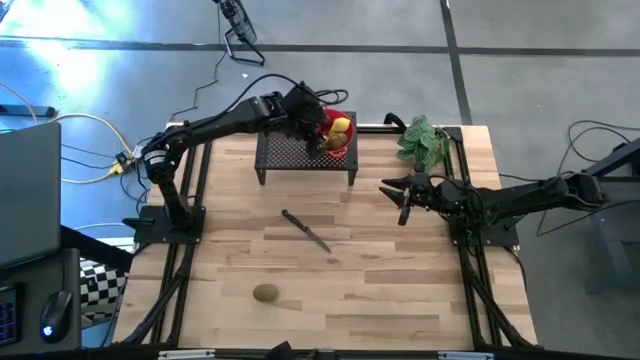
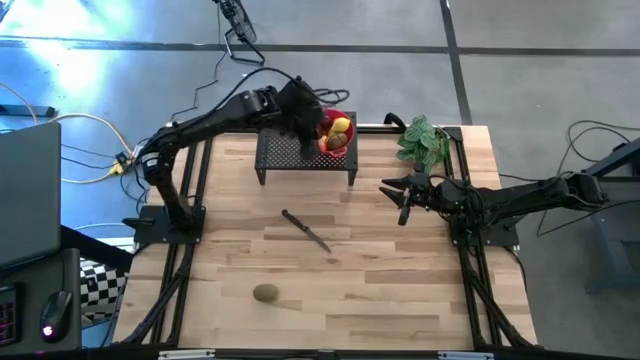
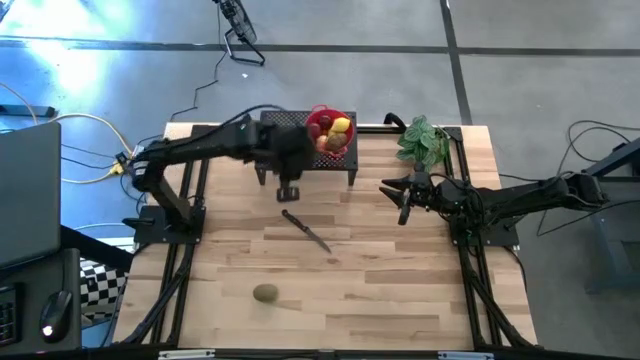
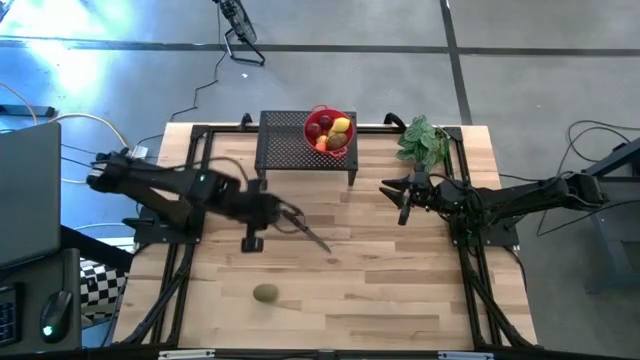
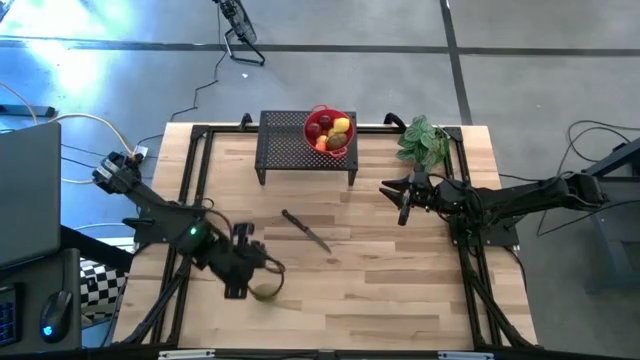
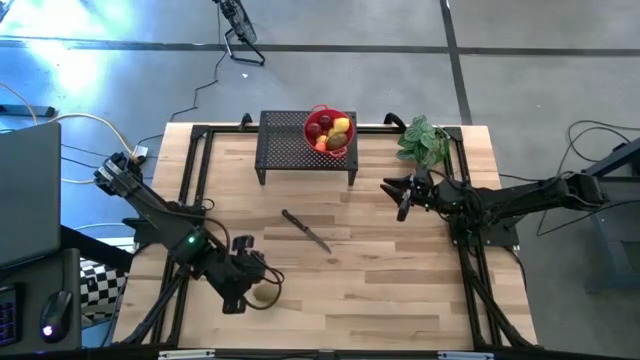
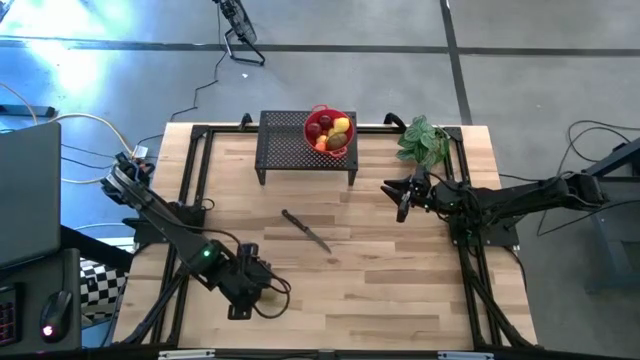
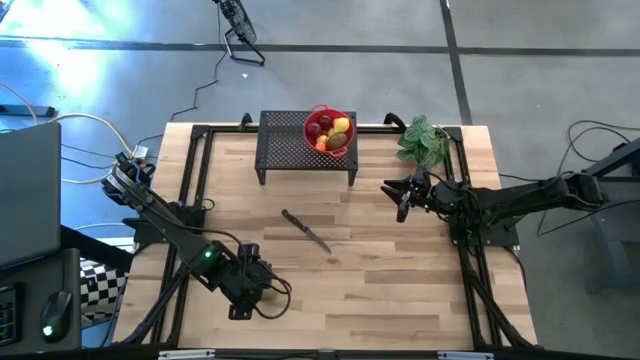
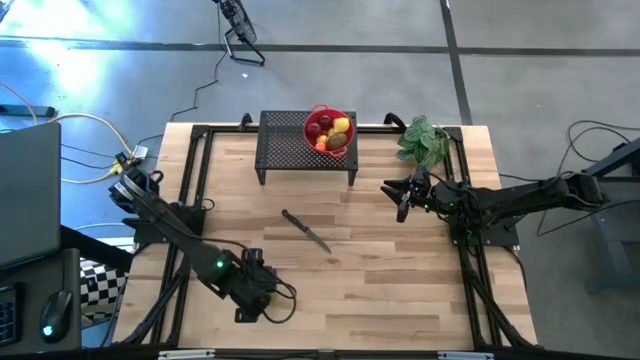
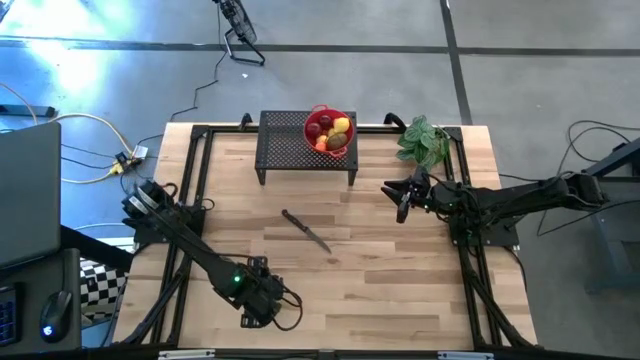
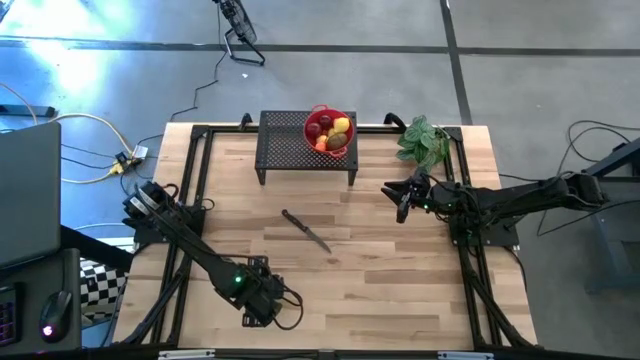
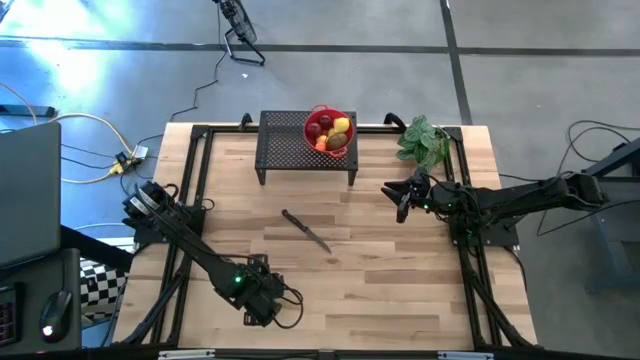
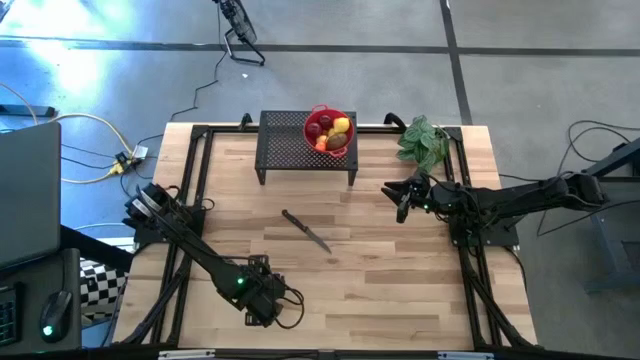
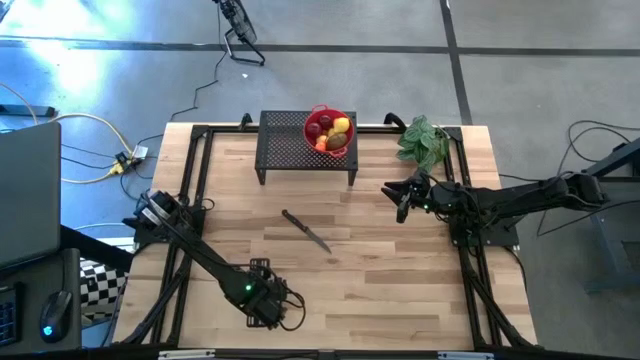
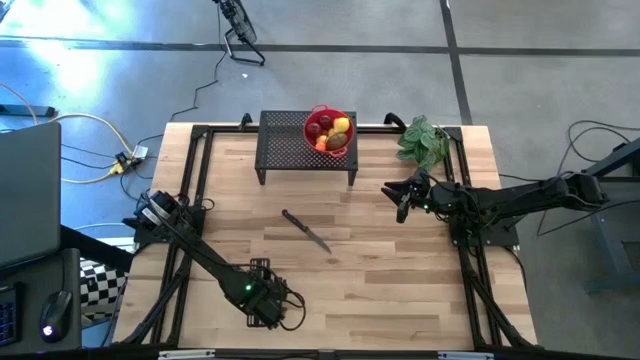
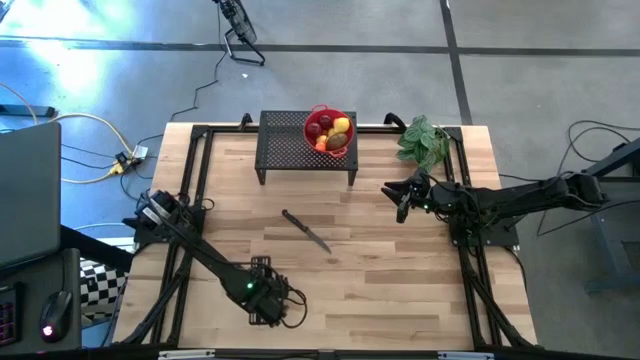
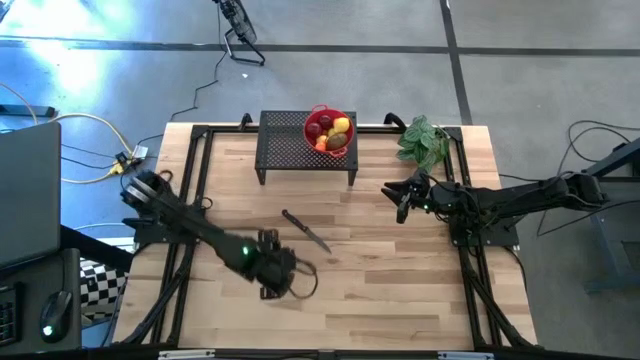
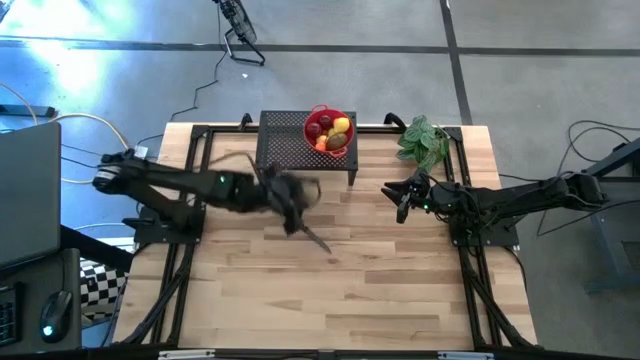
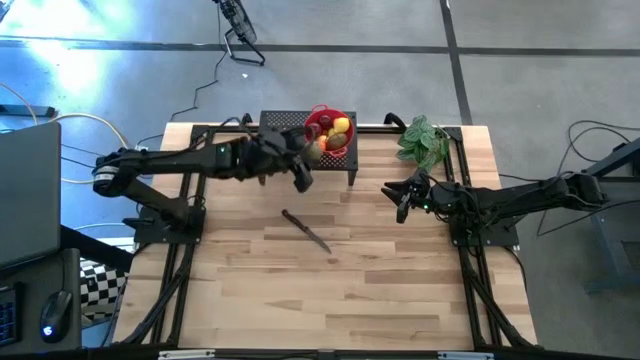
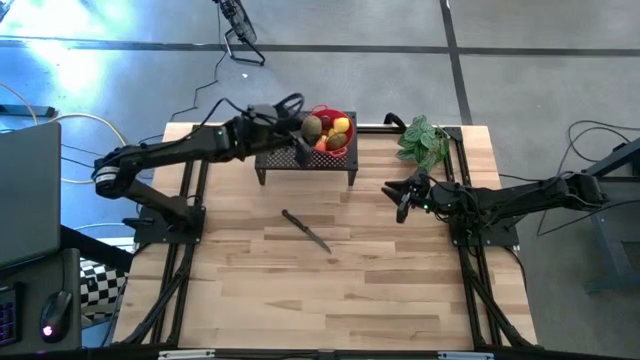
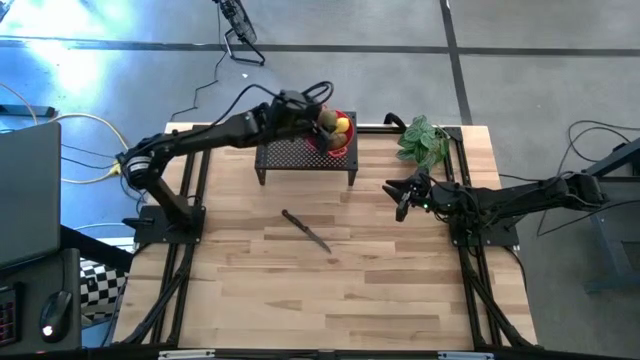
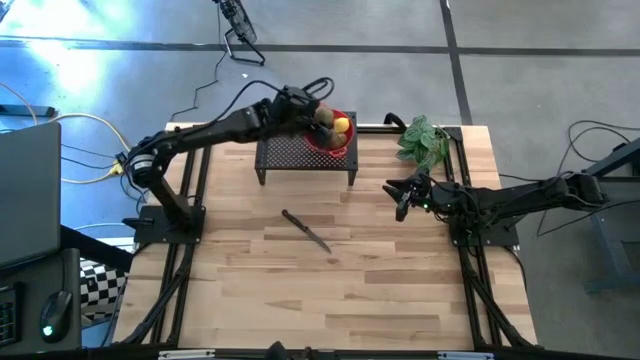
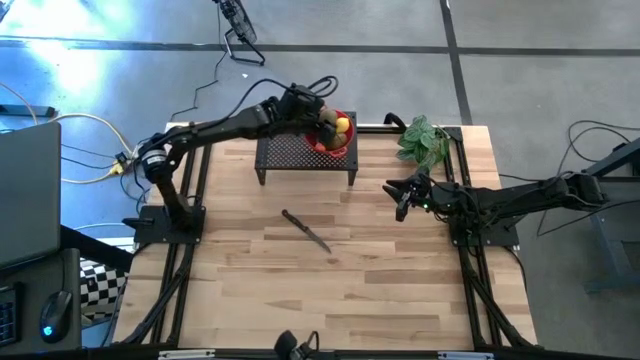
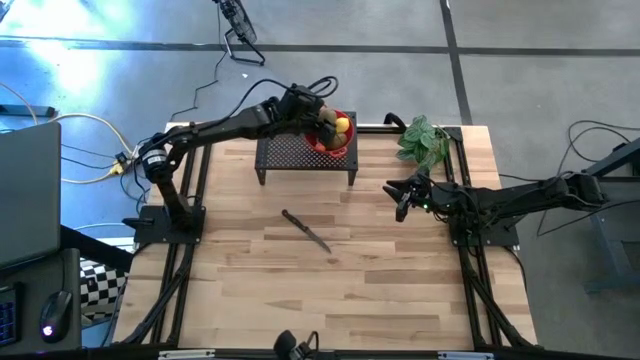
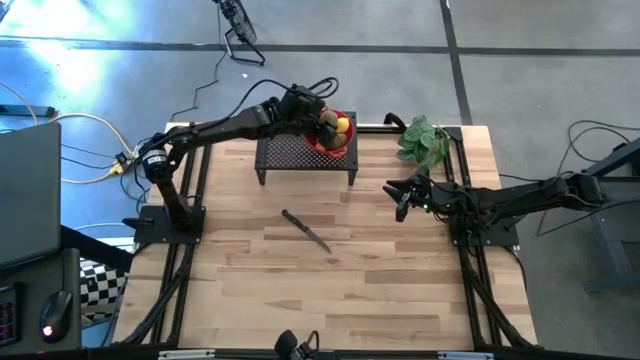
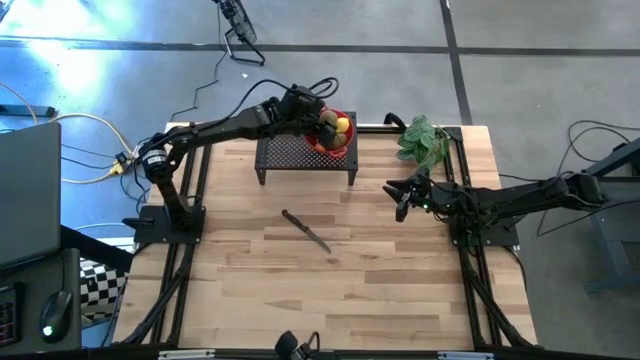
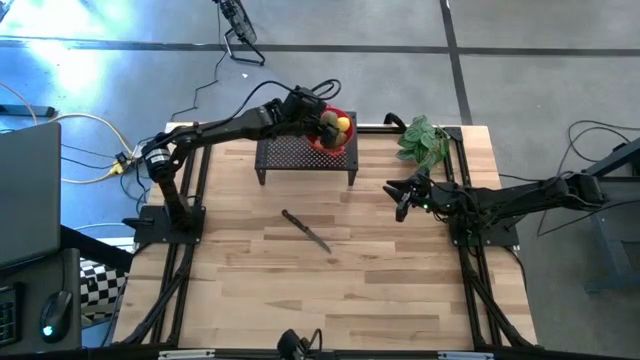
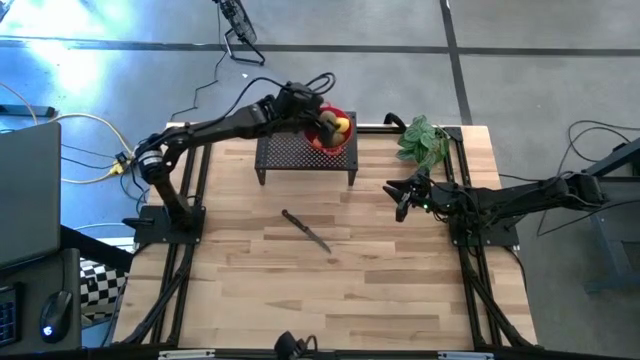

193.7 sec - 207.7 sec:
Task: Pick & Place Fruit
Put the kiwi into the colander on the shelf

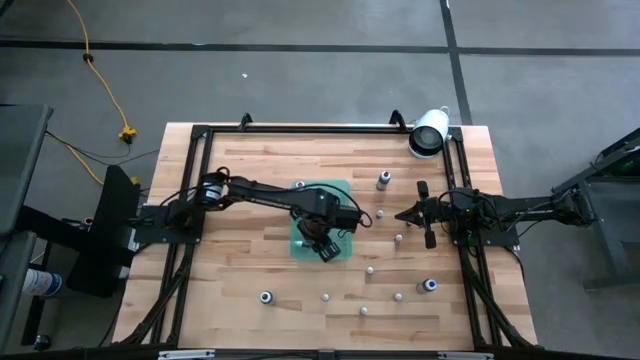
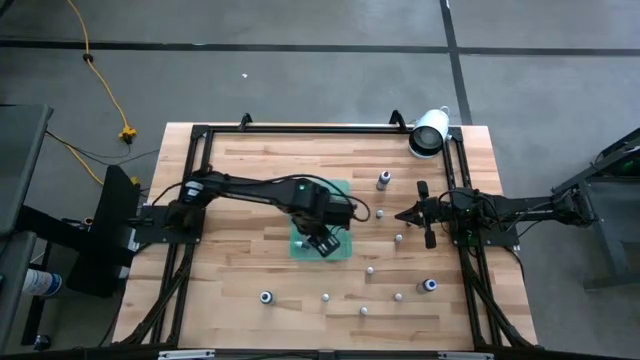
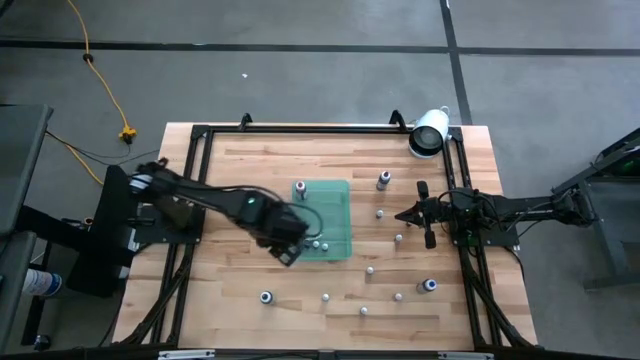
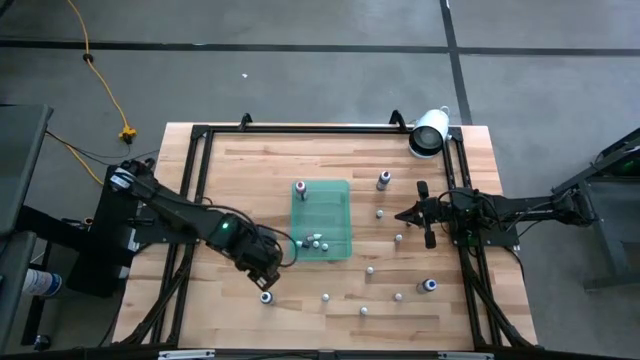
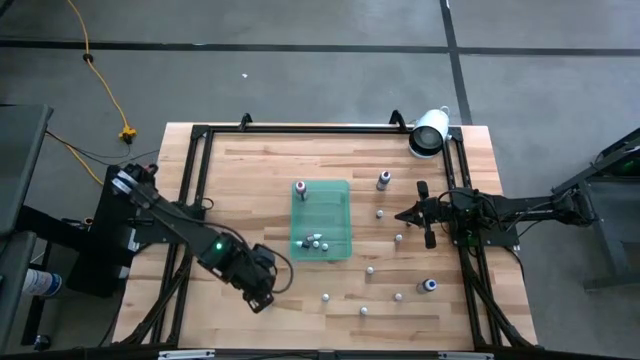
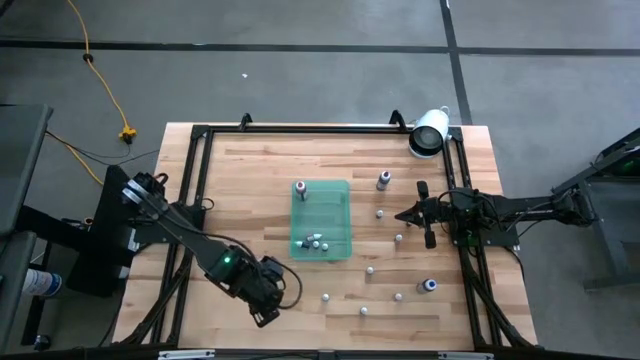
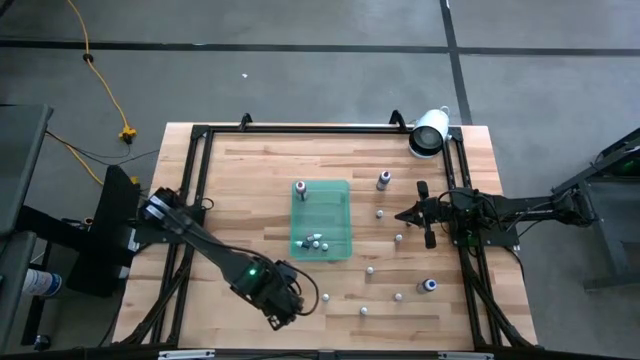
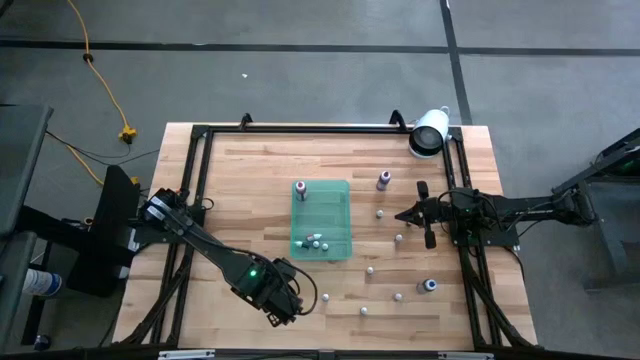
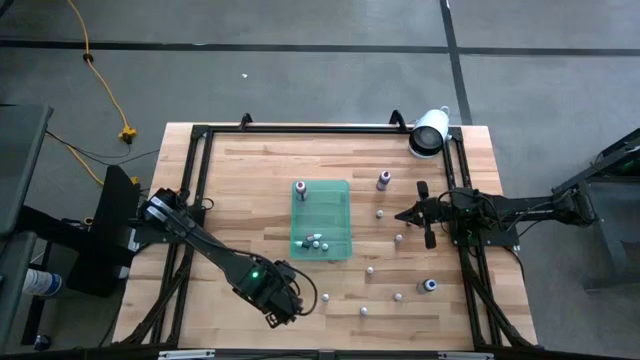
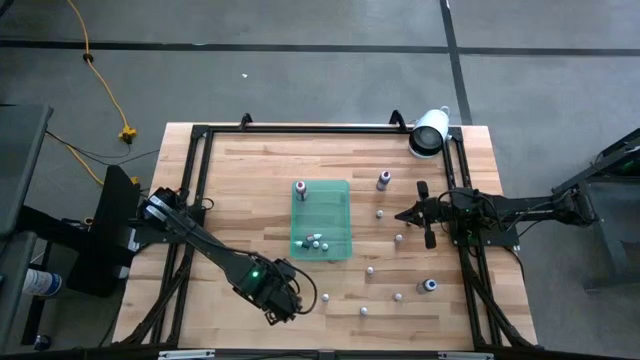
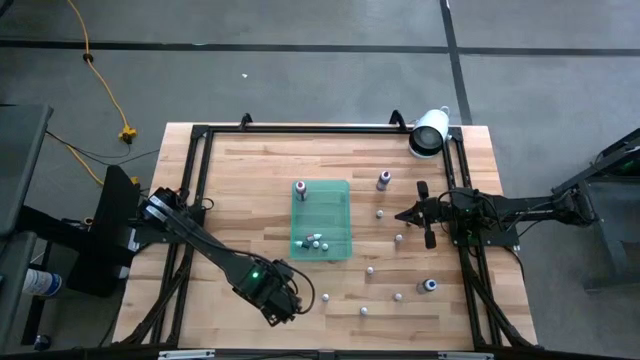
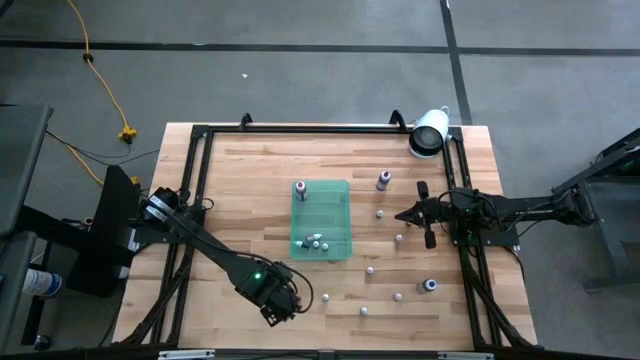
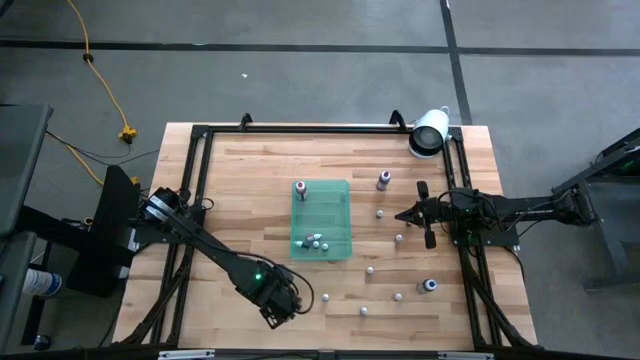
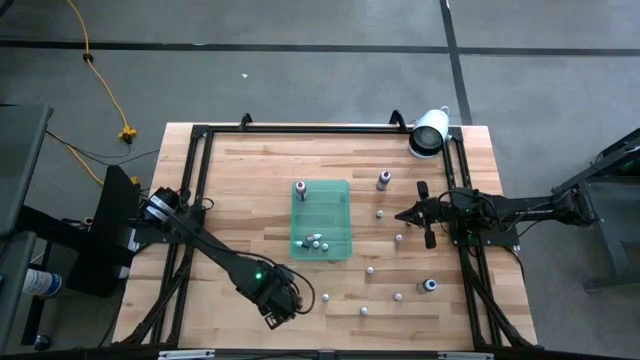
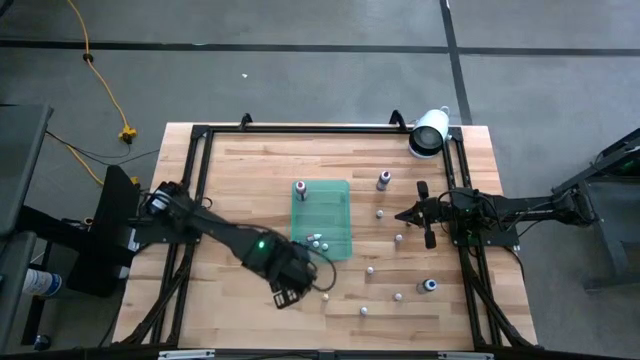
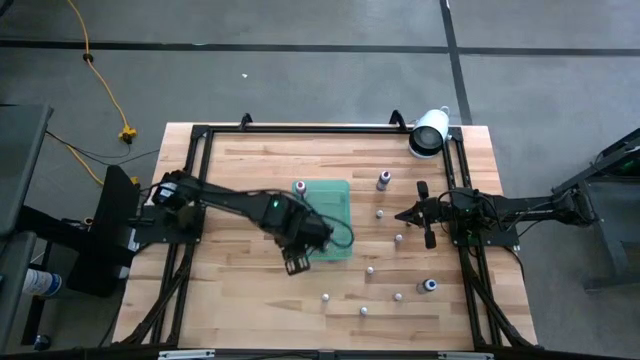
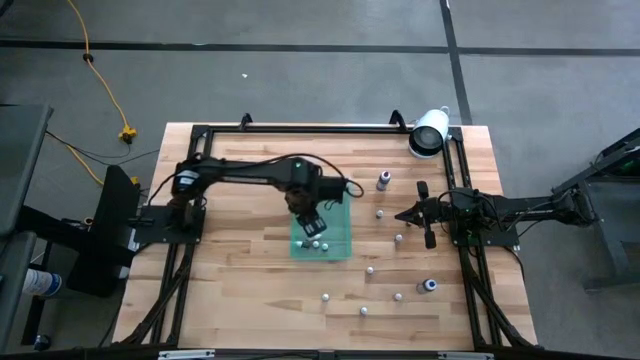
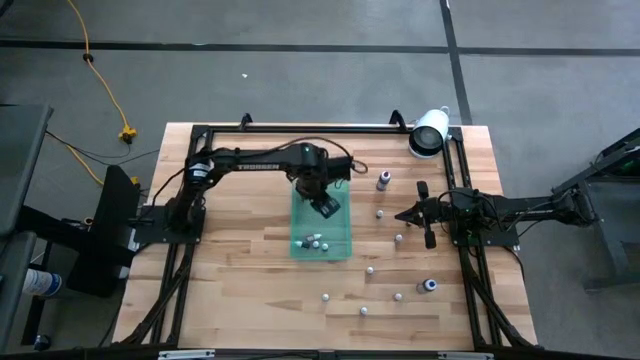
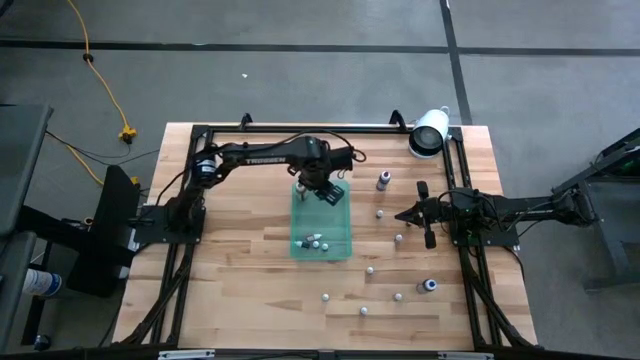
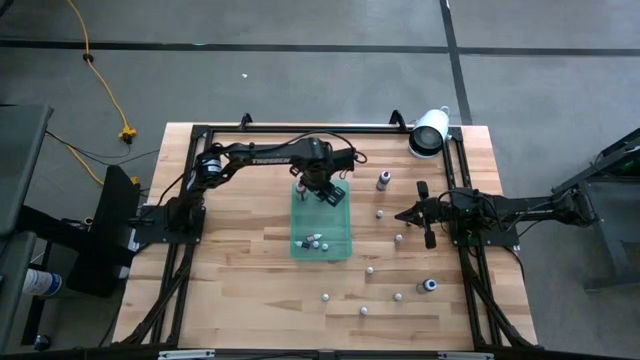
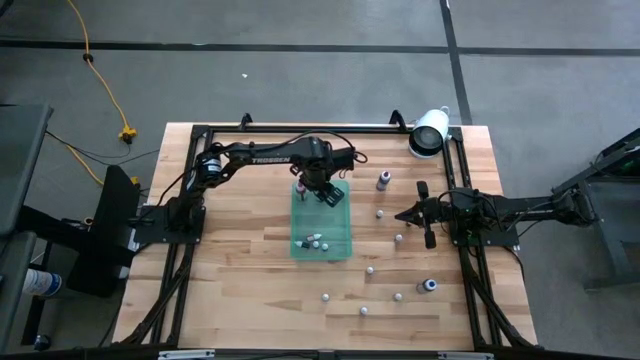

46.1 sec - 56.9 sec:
Task: Pick & Place food coloring
Put the big black food coloring bottle into the green bin
